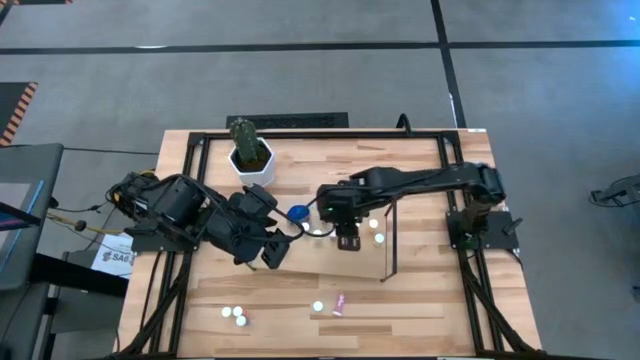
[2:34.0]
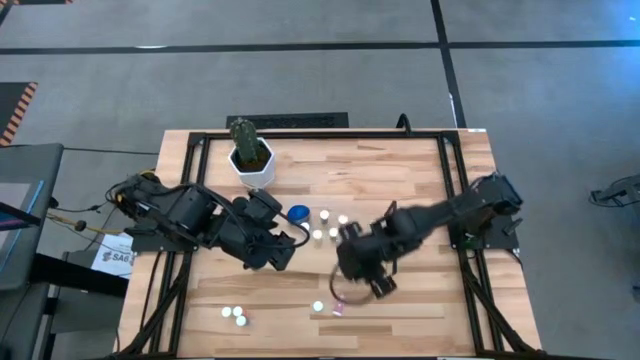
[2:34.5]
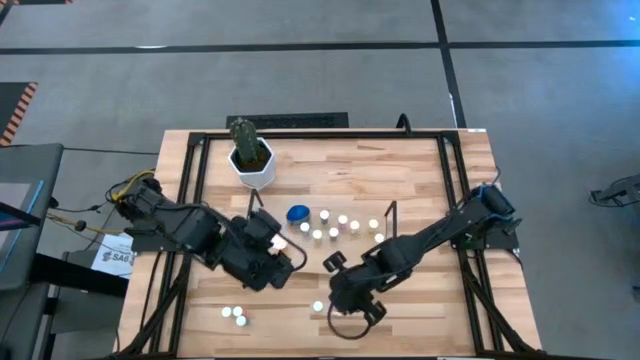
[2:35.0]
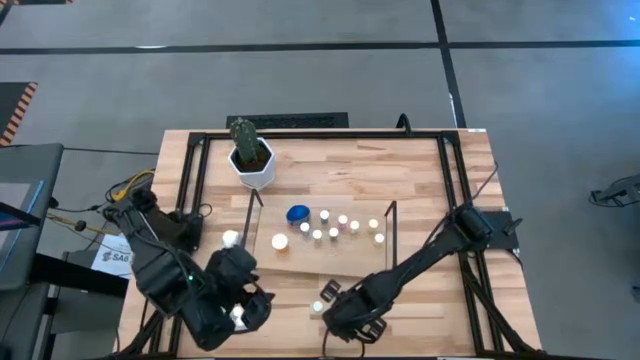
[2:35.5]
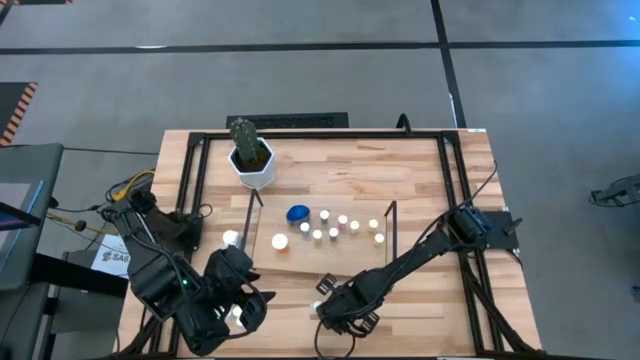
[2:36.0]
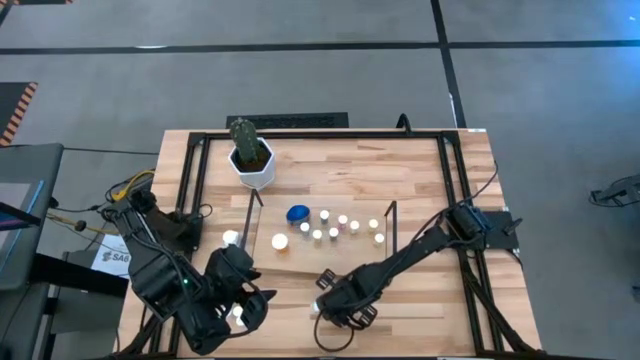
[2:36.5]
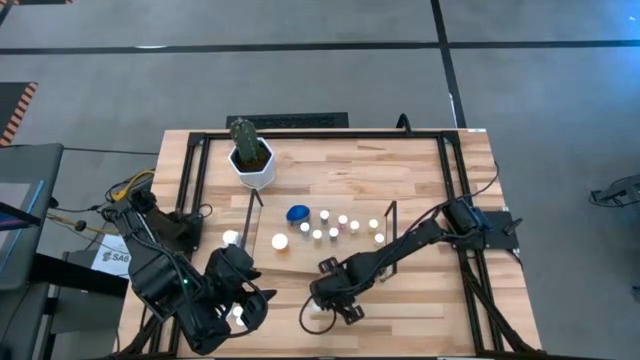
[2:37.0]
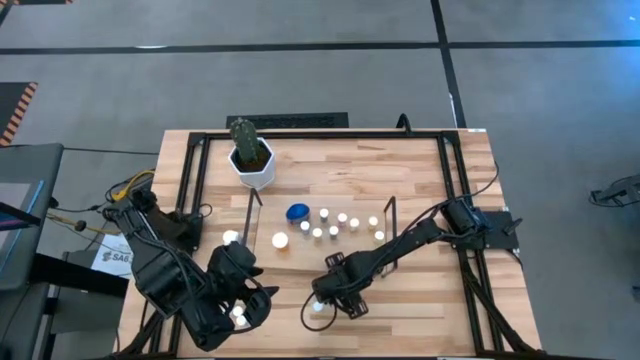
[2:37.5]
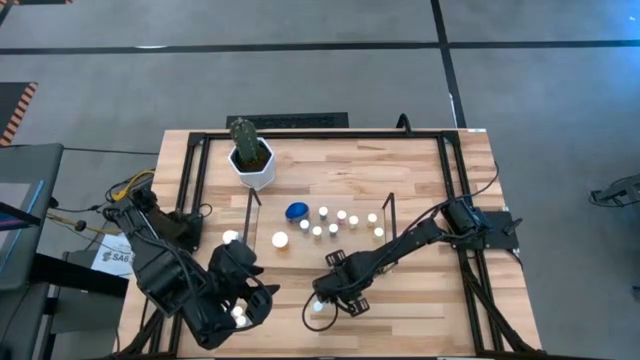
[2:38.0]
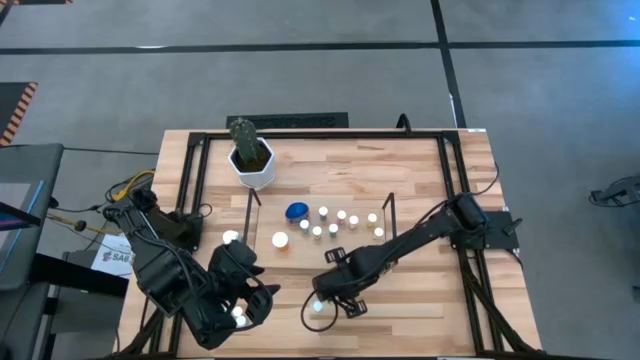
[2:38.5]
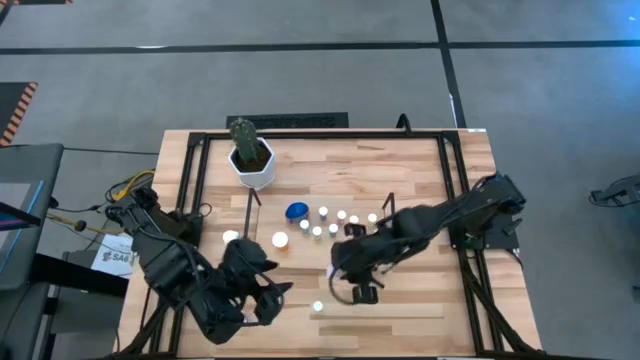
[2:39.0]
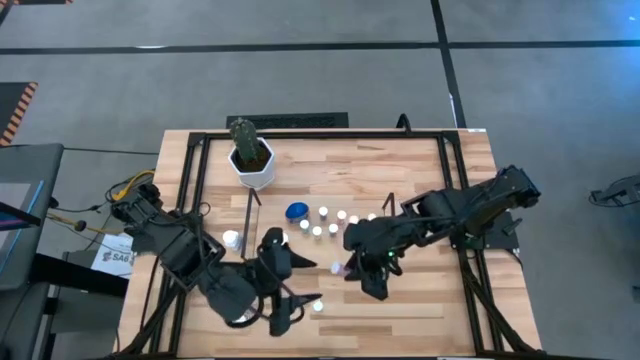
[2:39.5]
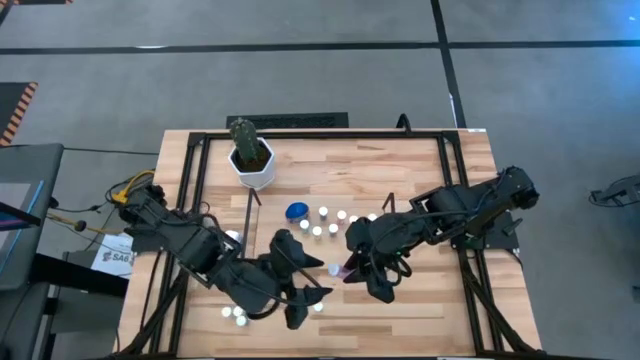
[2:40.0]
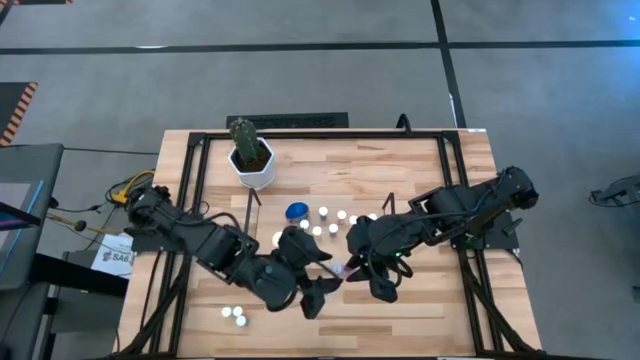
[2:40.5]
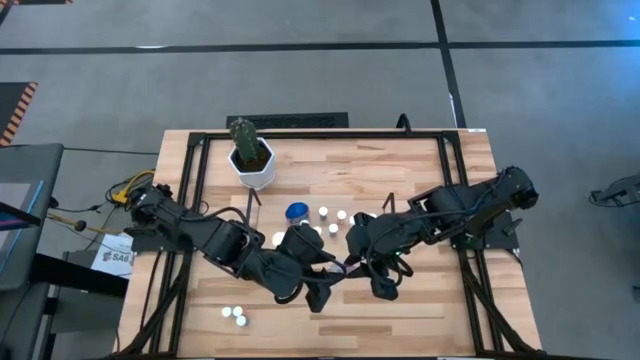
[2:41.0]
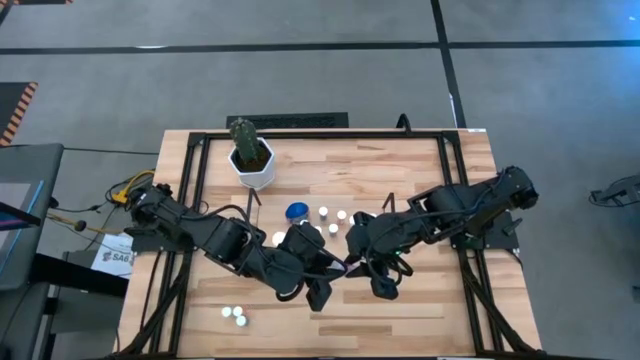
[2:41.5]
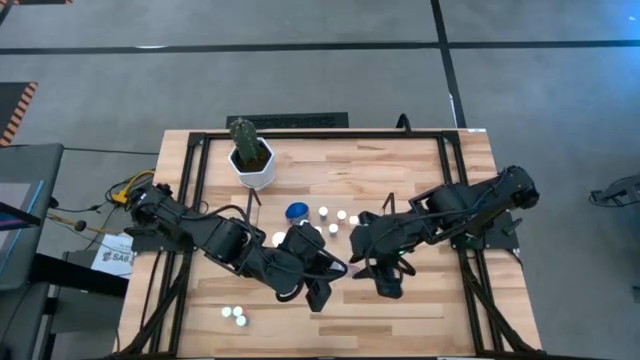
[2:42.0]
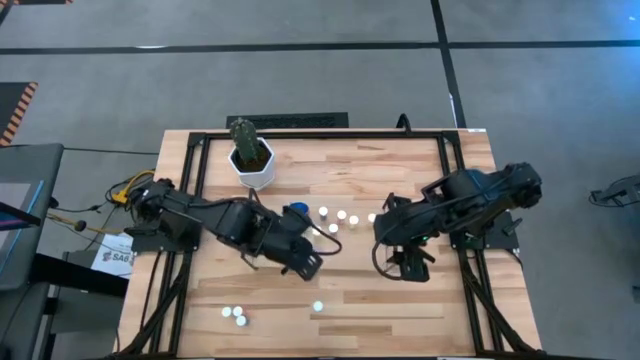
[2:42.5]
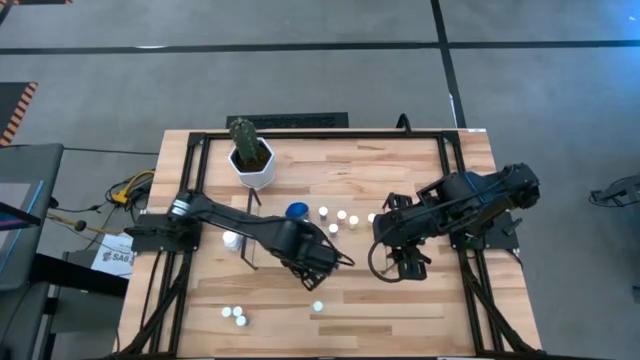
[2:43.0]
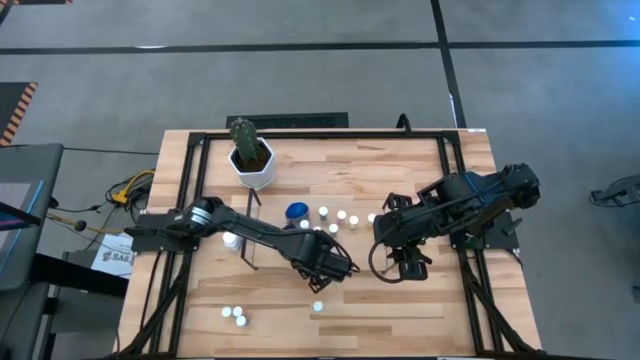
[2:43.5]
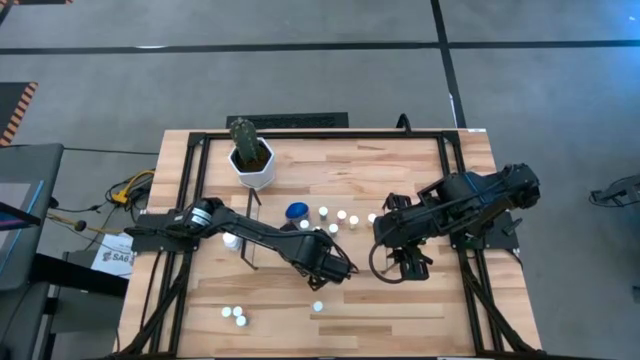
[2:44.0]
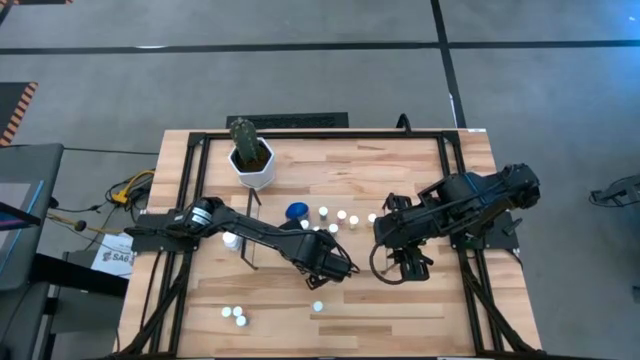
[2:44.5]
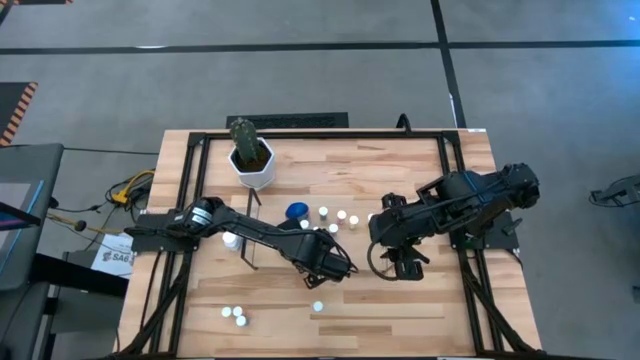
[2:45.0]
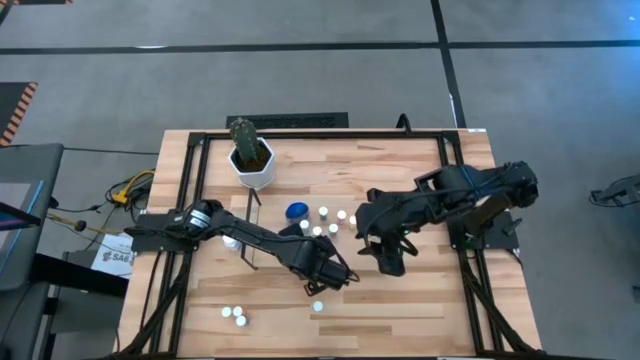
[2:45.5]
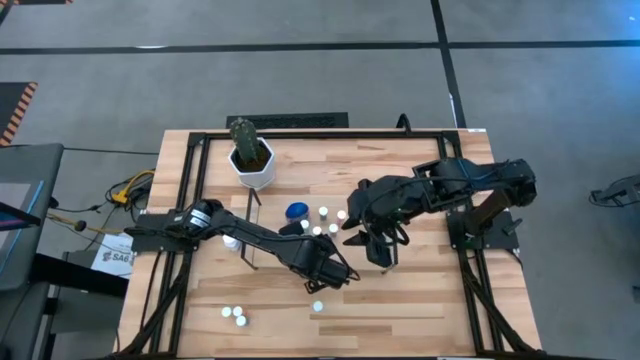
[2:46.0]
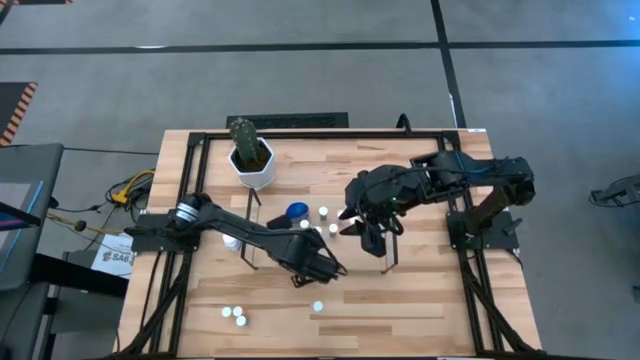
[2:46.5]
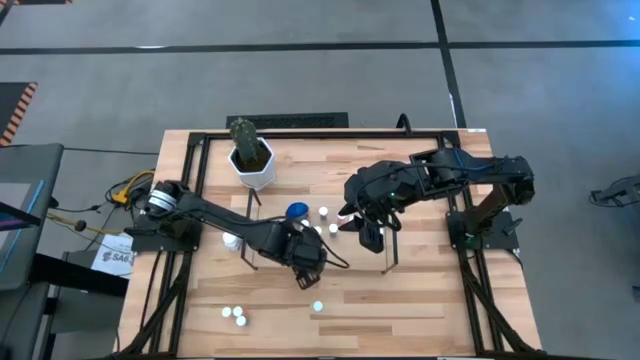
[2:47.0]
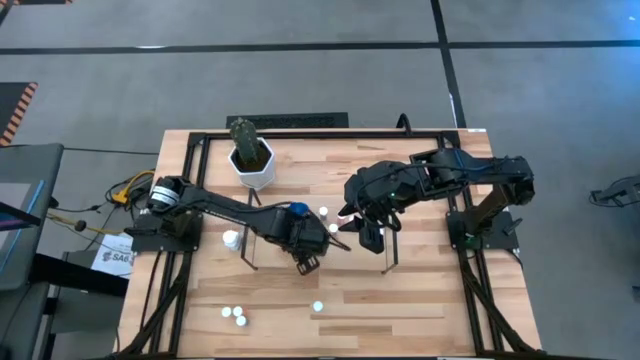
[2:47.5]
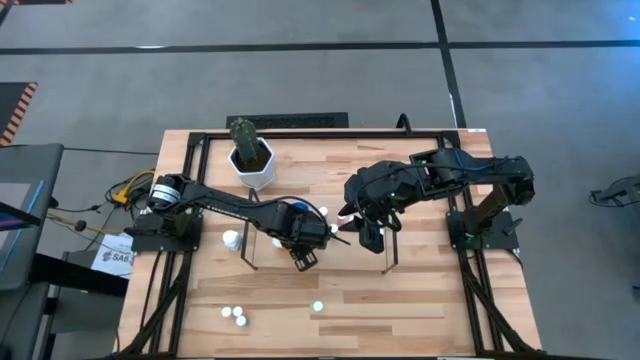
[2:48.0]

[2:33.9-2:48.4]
Task: Pick and place medicine bottles onto shelf by color
Put the pink pill bottle on the shelf

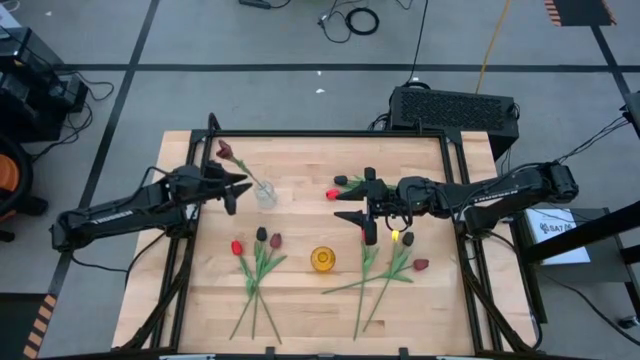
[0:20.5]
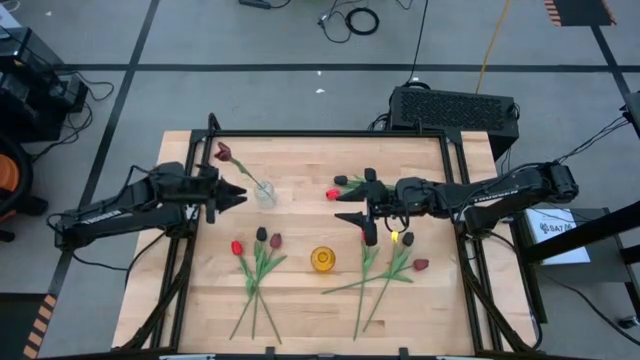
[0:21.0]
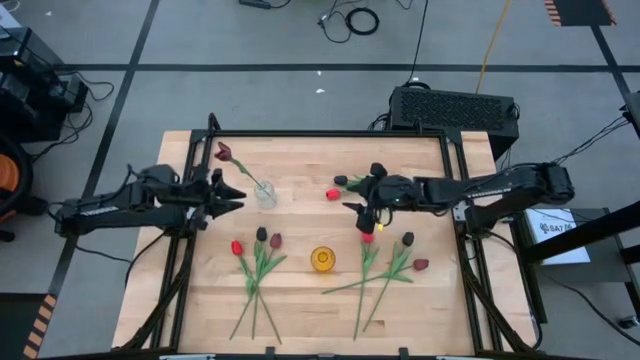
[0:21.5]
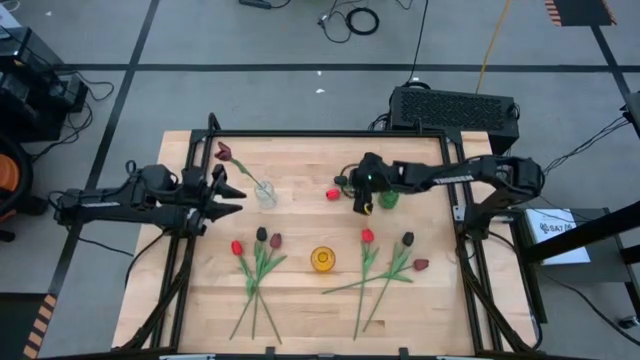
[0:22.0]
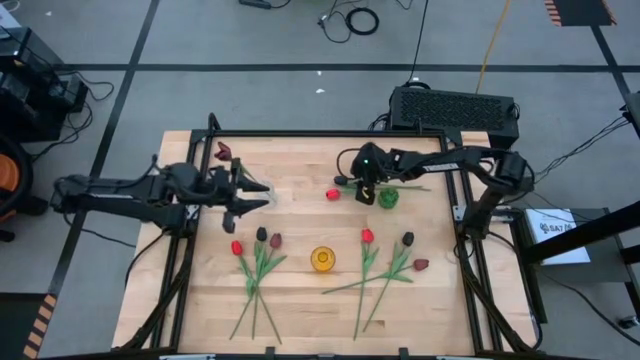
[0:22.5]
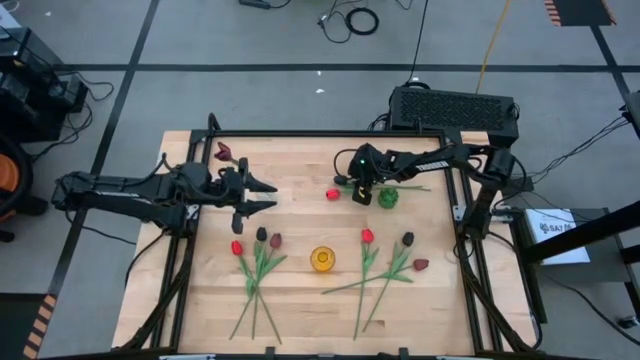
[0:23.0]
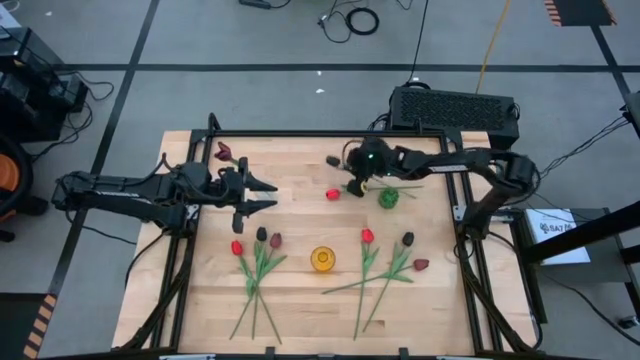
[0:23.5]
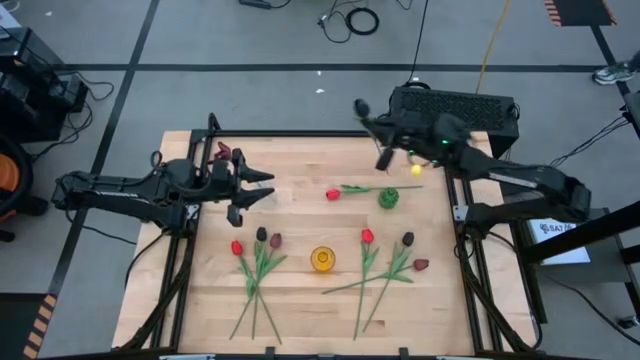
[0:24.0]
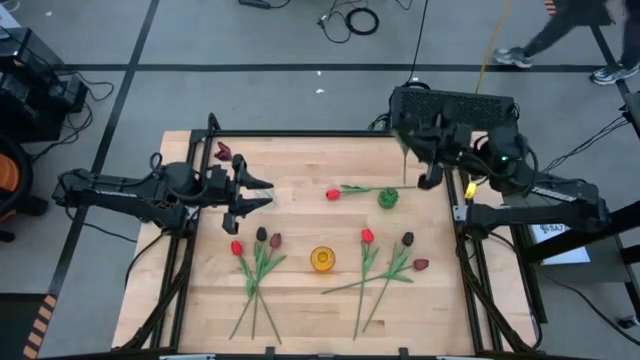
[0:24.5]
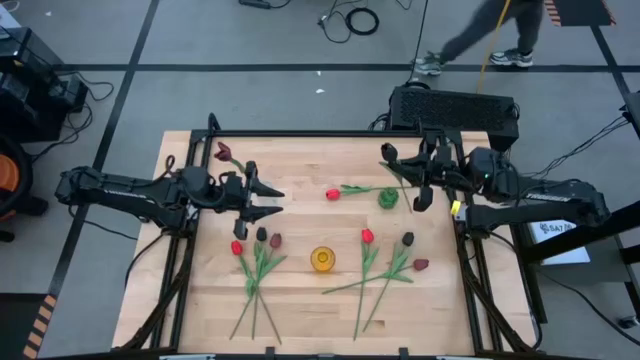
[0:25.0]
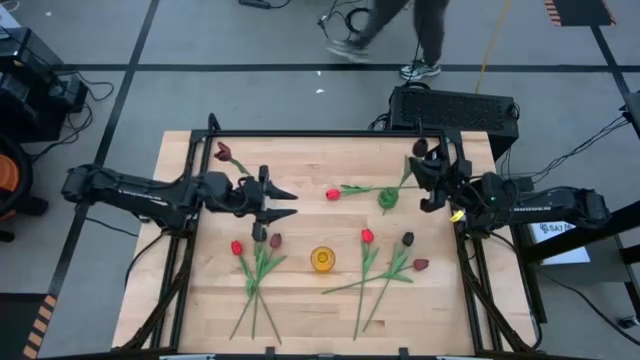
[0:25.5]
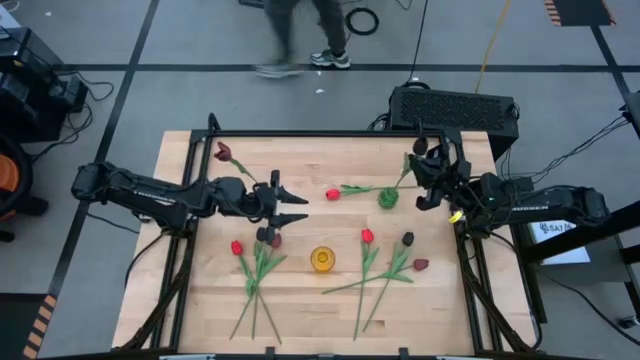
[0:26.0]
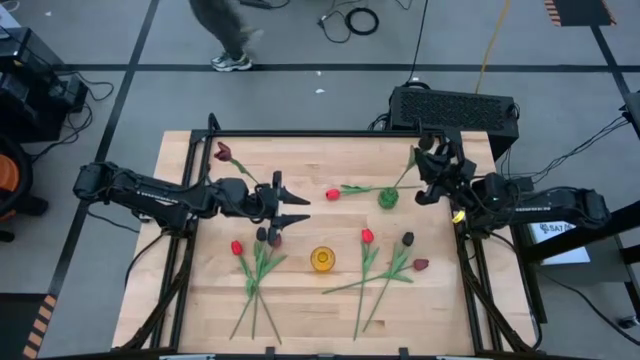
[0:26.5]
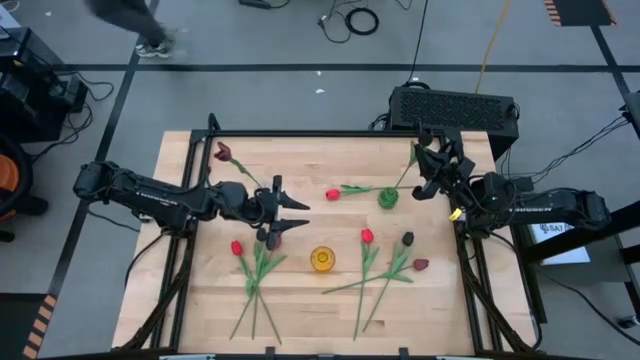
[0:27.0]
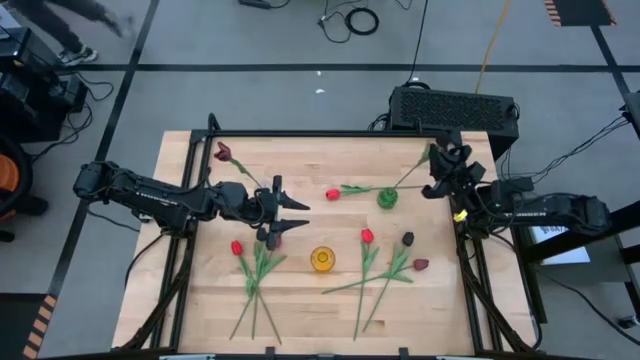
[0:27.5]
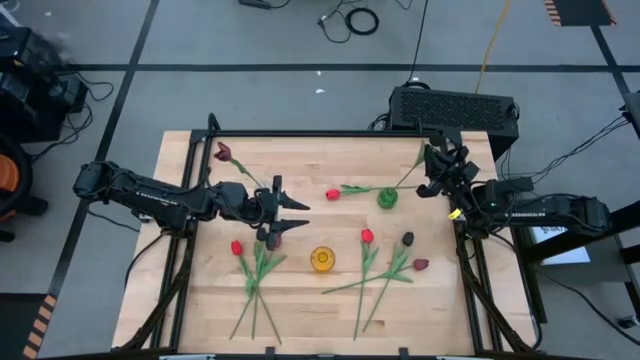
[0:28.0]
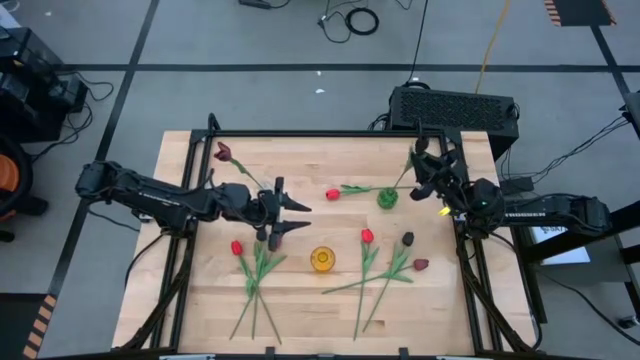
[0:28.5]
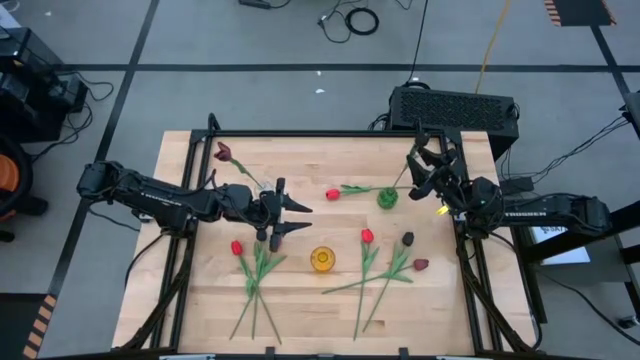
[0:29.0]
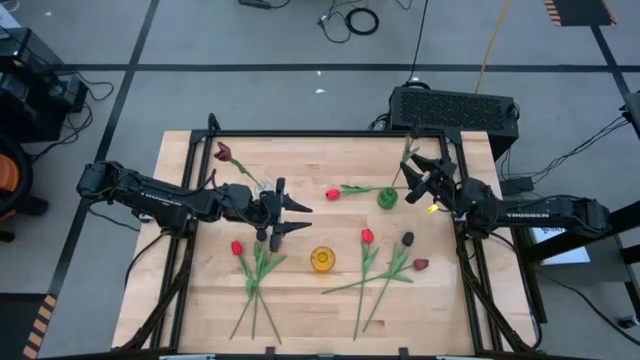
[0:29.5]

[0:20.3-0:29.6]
Task: Sort flowers into vase by color
Put the top black flower into the green vase
